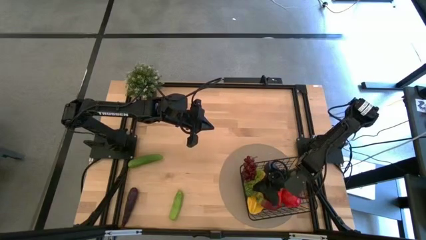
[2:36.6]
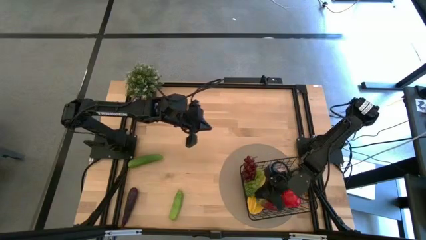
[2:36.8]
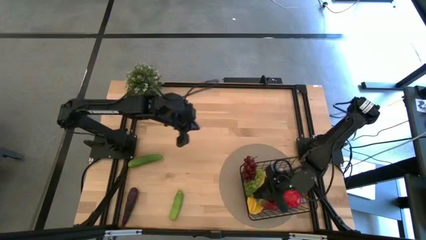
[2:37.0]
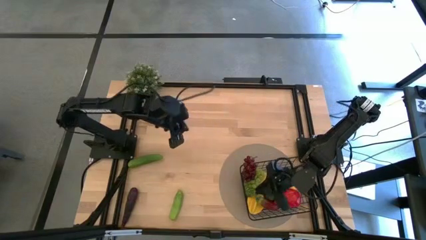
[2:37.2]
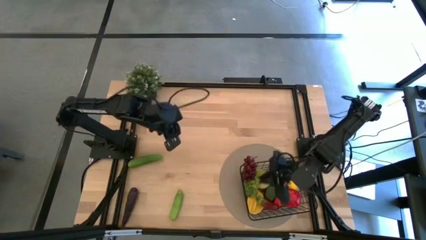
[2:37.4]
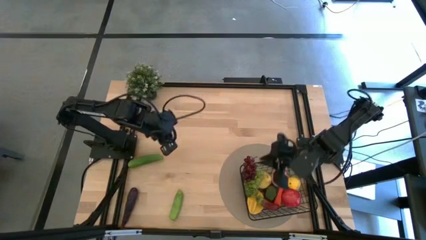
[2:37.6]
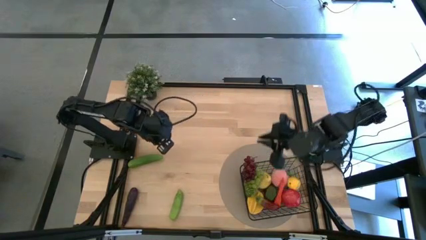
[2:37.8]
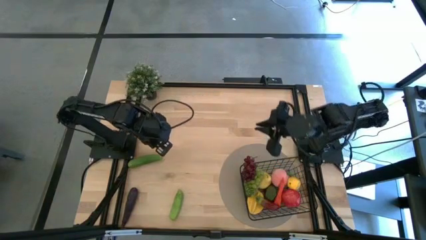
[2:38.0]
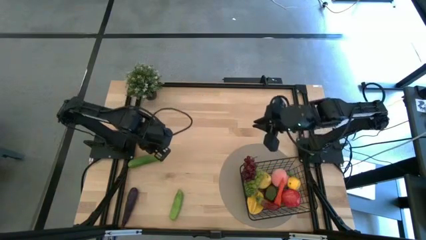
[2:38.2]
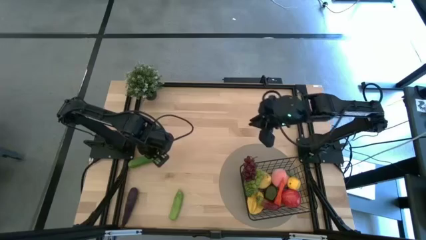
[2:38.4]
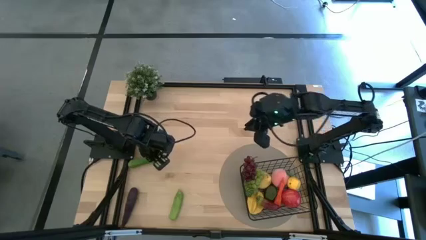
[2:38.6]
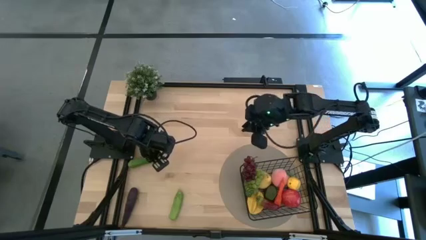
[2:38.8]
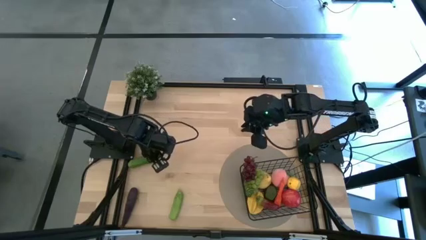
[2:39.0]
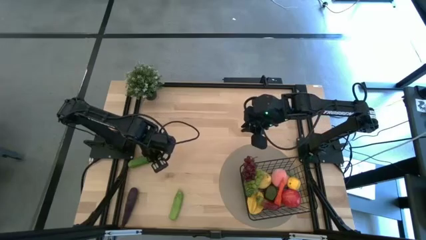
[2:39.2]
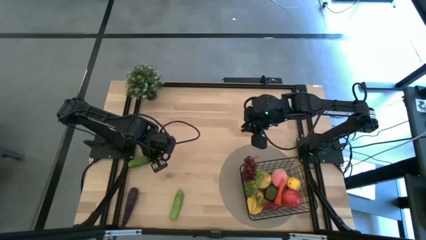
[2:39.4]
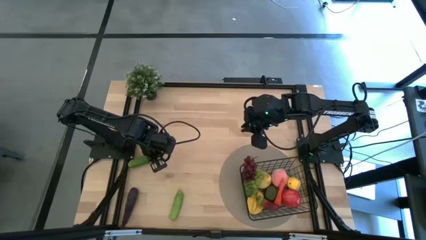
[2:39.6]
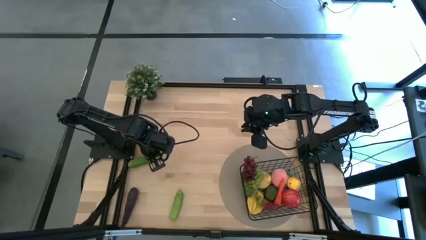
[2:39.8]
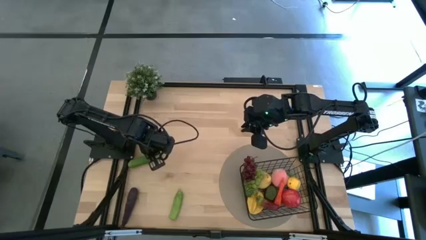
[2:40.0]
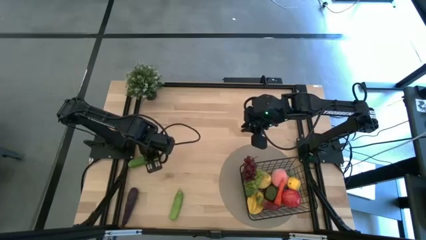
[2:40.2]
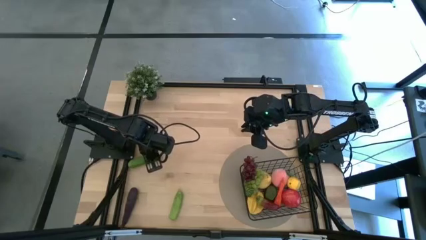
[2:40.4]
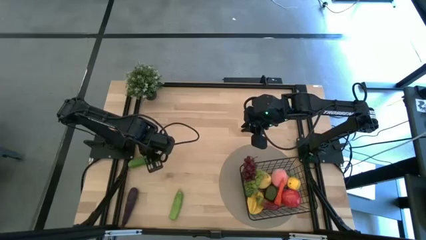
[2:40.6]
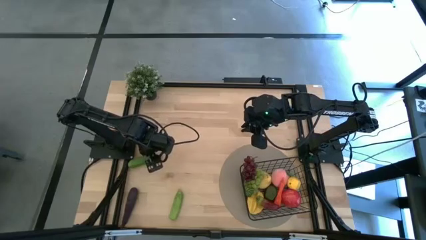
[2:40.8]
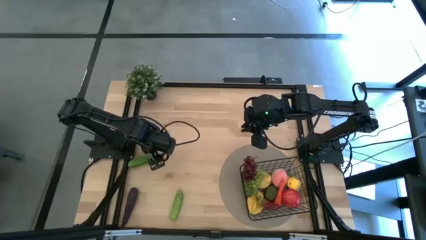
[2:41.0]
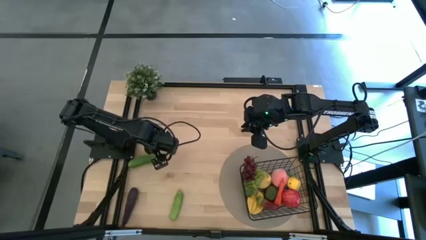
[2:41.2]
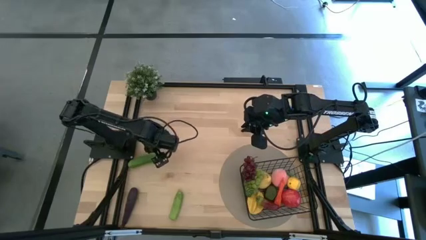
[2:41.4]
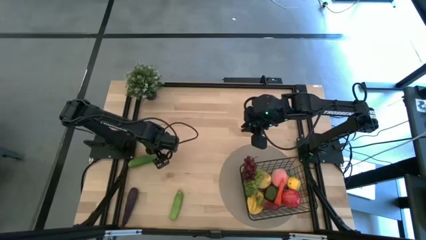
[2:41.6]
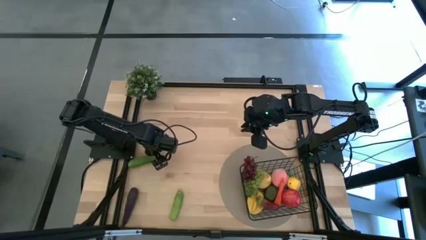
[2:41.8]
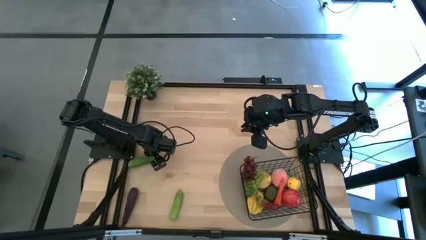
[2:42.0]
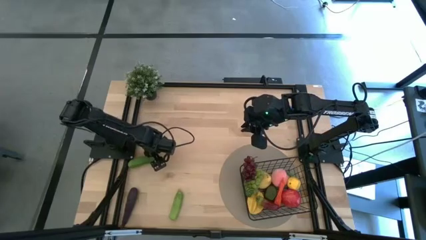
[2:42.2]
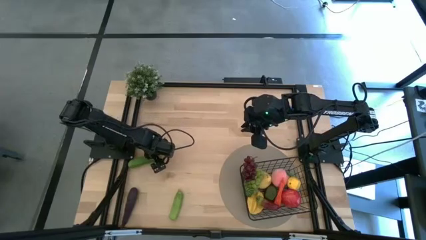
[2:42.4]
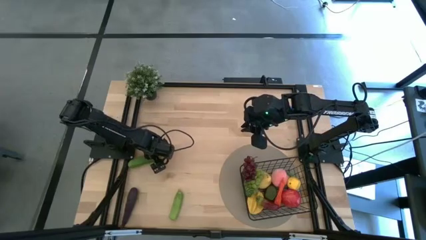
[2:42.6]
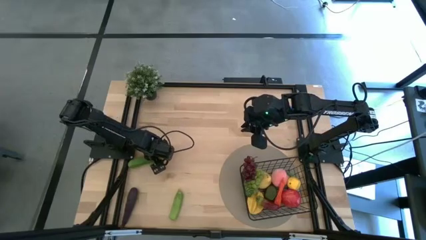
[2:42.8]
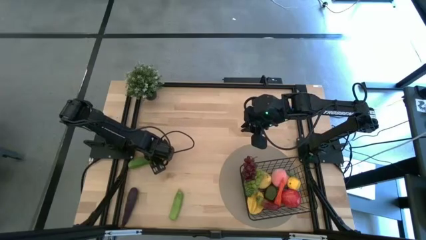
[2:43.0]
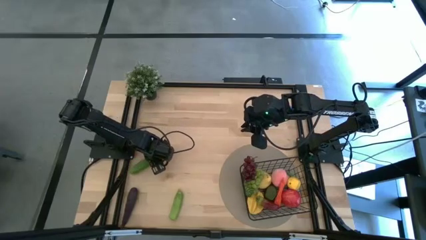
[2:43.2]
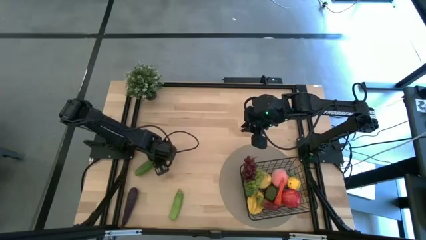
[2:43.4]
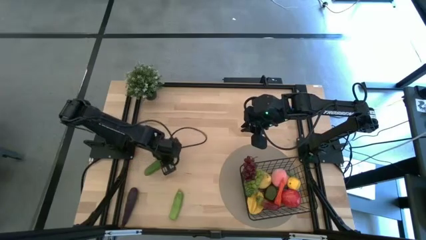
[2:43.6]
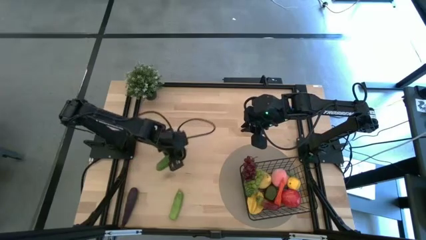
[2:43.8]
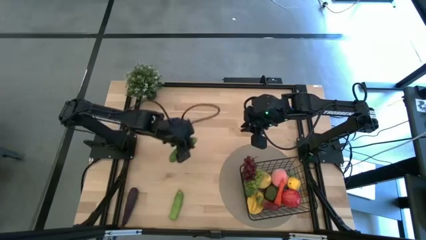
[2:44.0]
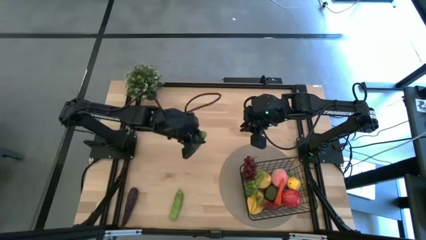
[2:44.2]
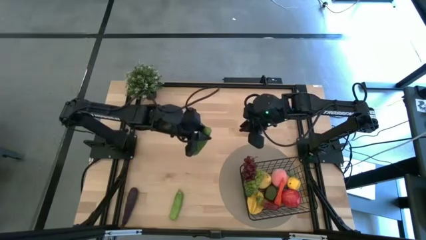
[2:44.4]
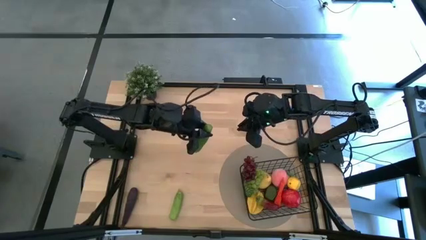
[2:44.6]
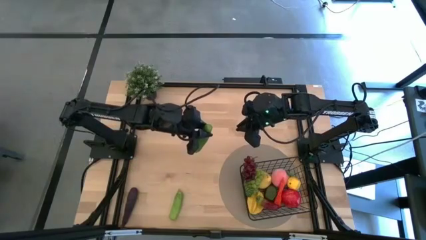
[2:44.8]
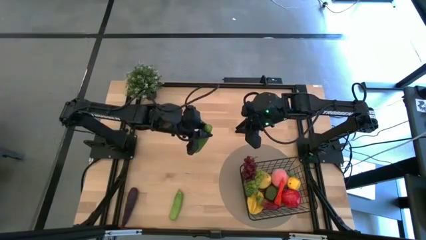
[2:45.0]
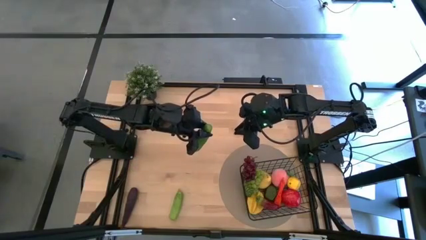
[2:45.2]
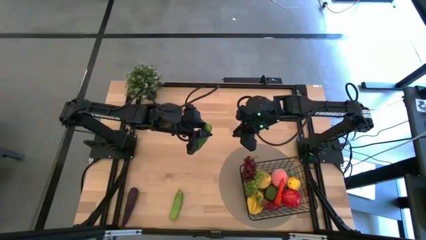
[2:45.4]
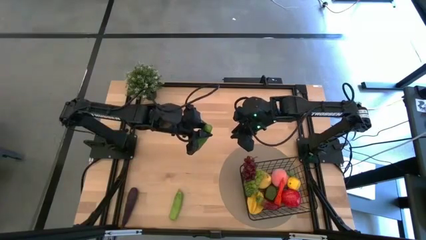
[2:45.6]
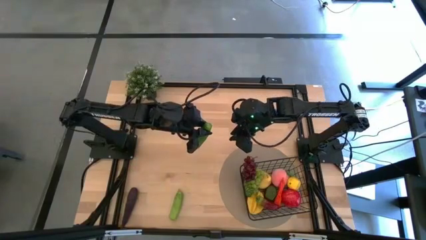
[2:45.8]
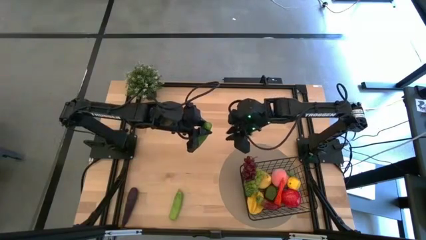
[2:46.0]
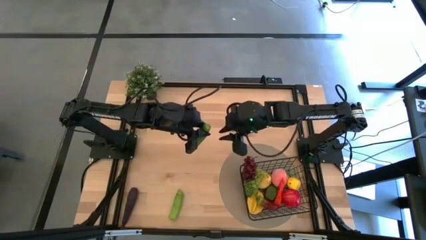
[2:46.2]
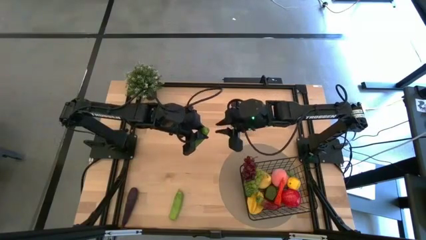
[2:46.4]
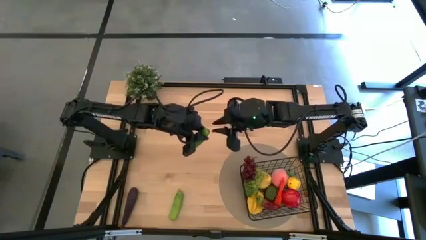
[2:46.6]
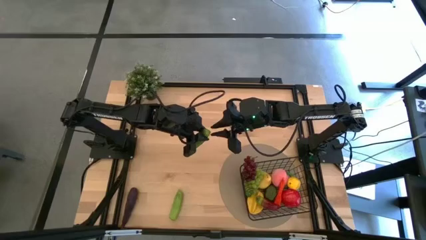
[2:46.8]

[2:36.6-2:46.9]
Task: Build produce basket
Put the cucumber into the wire basket

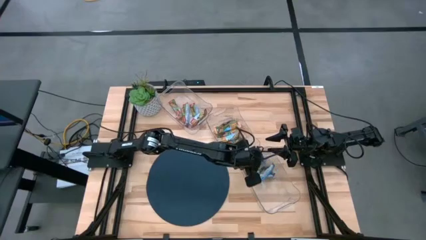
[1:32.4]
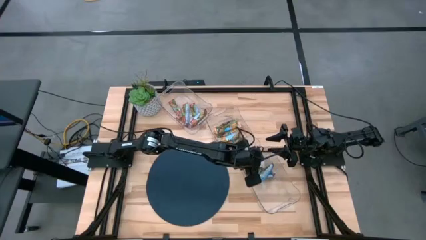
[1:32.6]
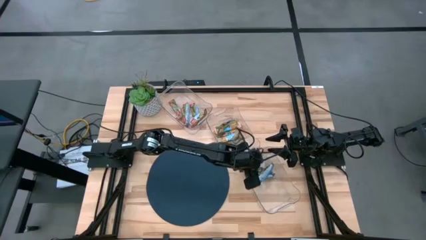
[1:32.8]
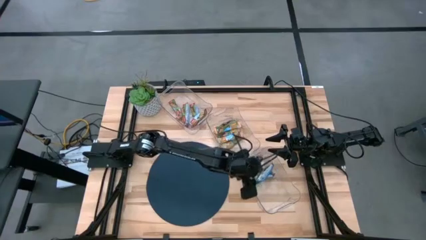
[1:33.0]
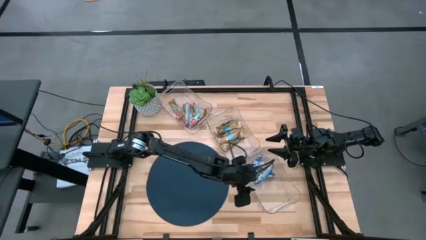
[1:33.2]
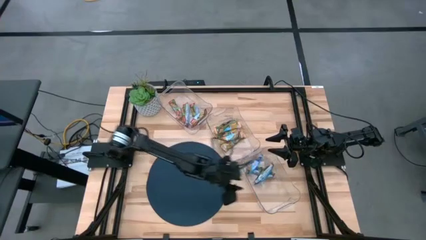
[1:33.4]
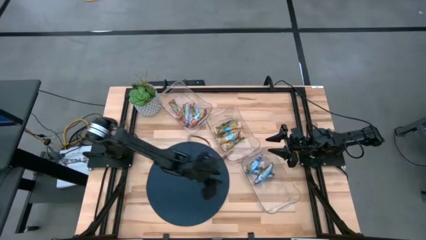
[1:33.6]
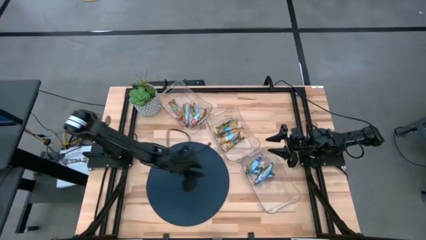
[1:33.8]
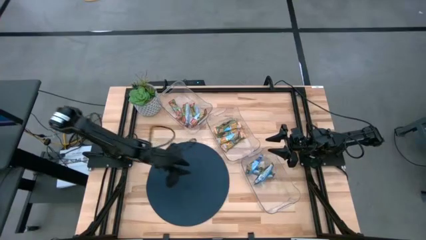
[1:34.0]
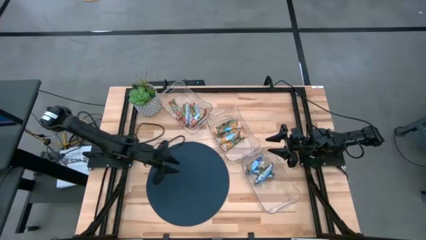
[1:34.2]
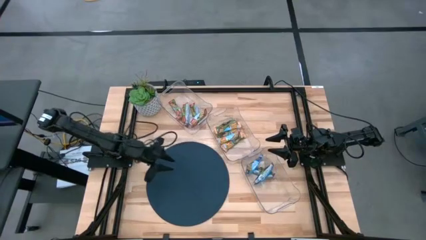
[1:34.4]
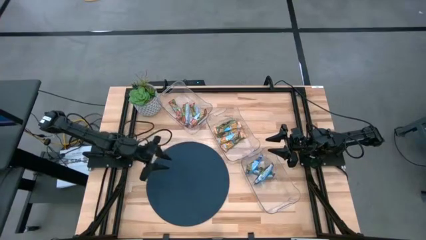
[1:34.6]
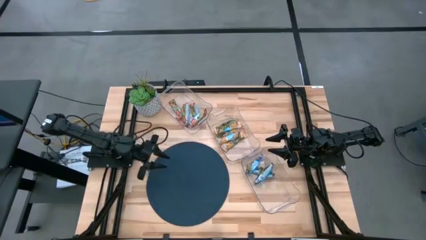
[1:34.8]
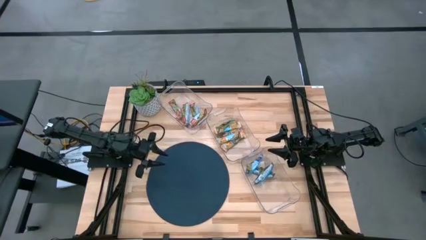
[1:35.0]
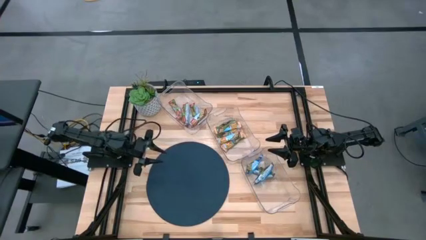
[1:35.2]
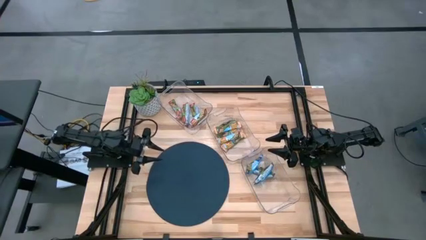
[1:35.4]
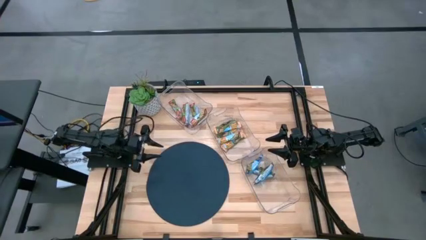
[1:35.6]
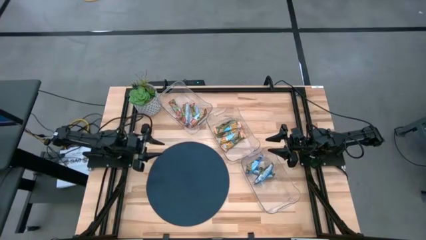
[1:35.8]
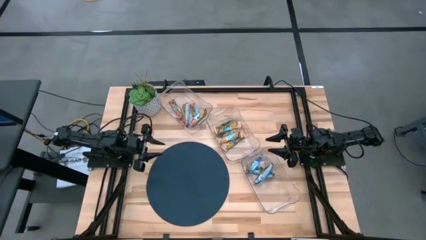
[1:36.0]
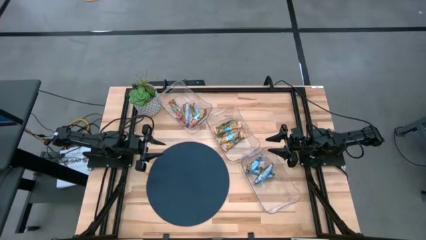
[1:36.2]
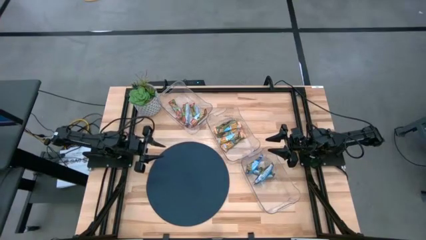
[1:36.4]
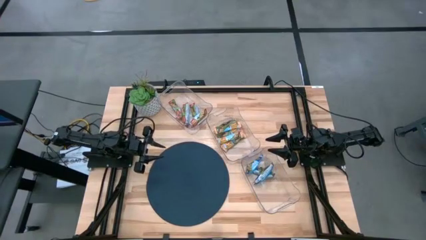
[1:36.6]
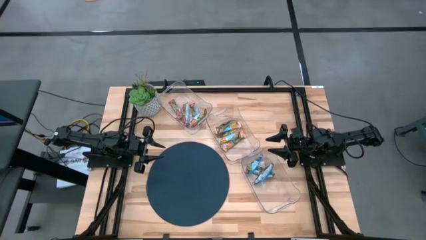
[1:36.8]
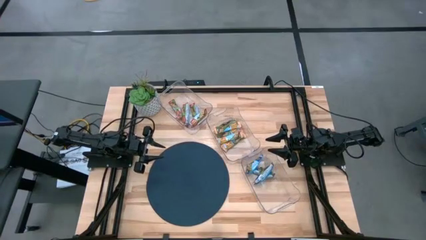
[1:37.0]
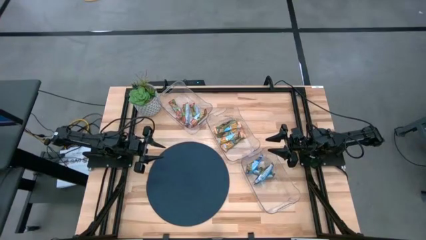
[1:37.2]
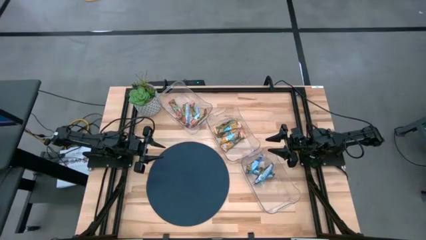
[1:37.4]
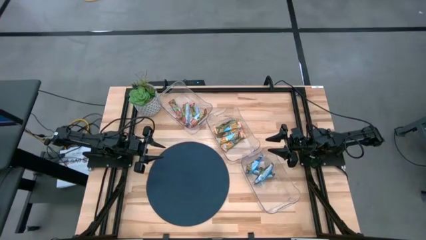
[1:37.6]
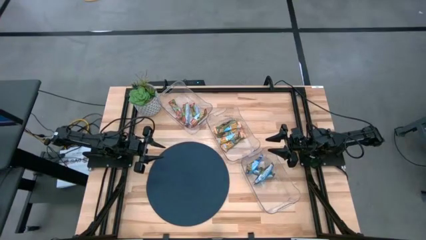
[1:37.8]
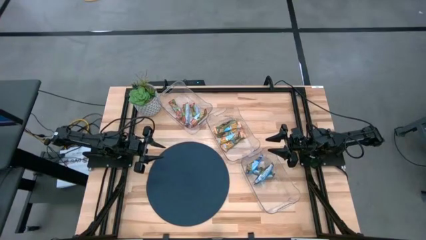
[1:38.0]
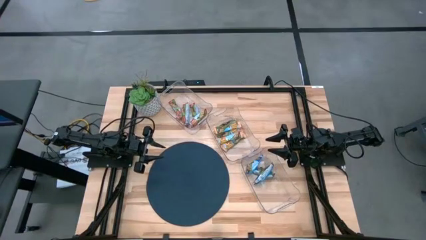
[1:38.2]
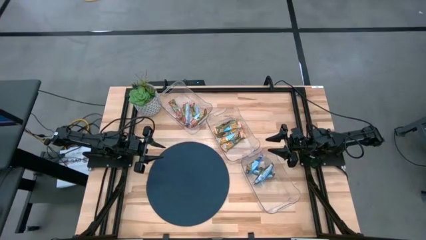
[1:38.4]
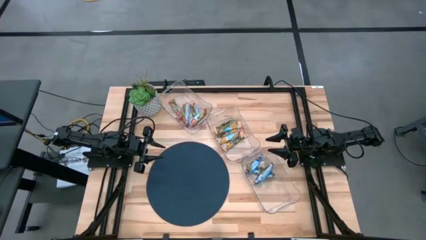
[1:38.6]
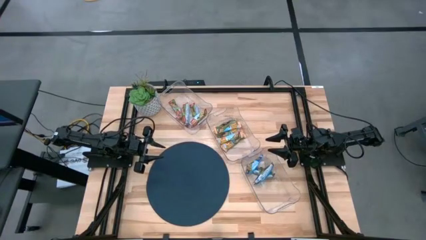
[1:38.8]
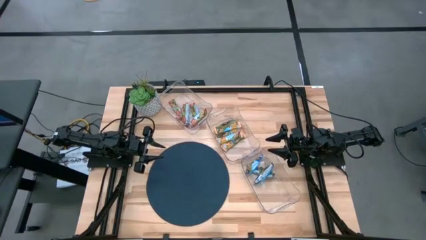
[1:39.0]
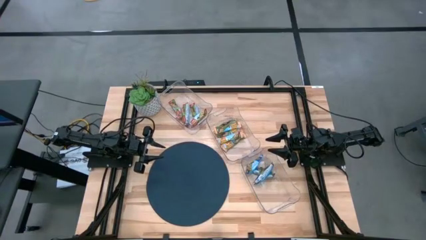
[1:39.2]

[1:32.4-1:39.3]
Task: Pick and place Granola Bars by type
Return to Home Position
